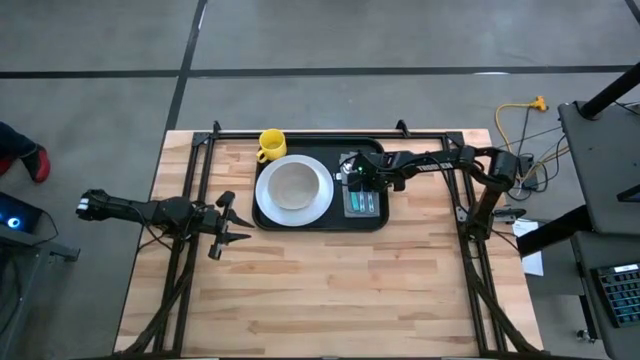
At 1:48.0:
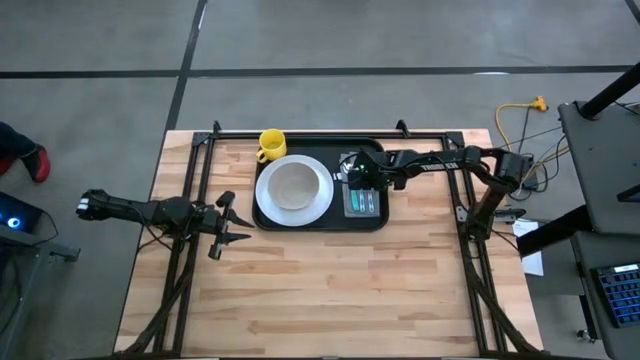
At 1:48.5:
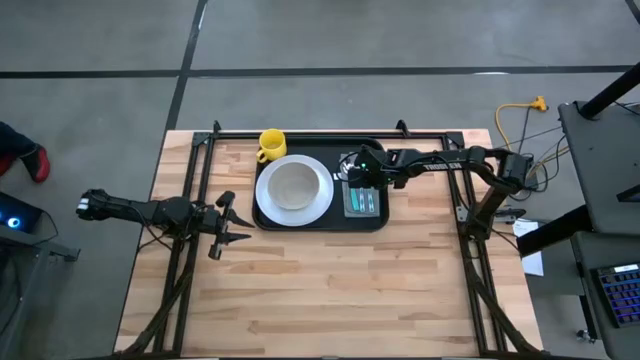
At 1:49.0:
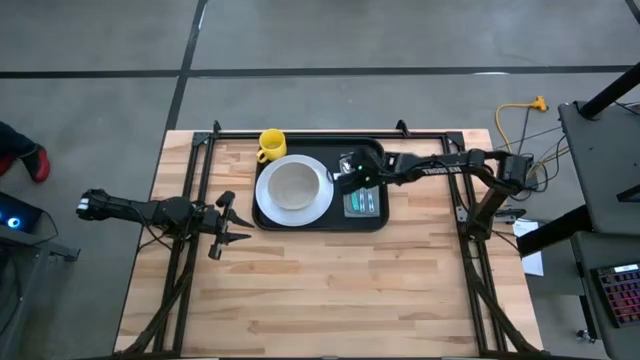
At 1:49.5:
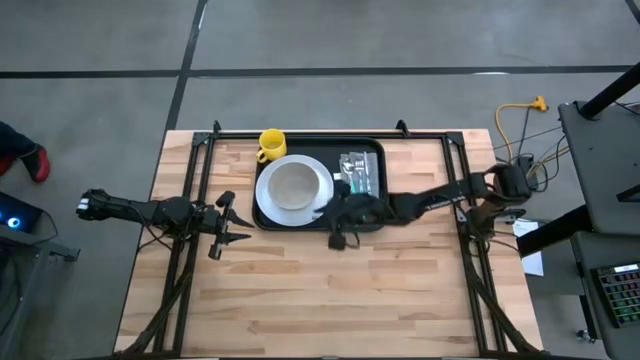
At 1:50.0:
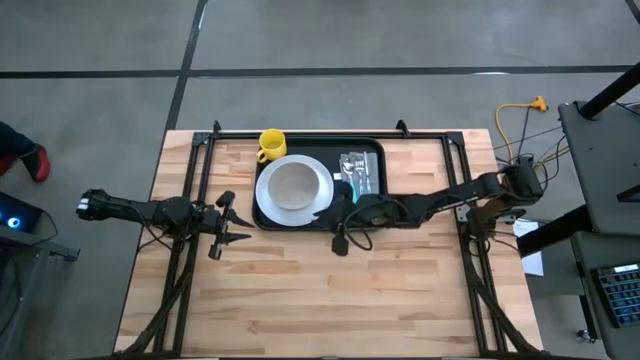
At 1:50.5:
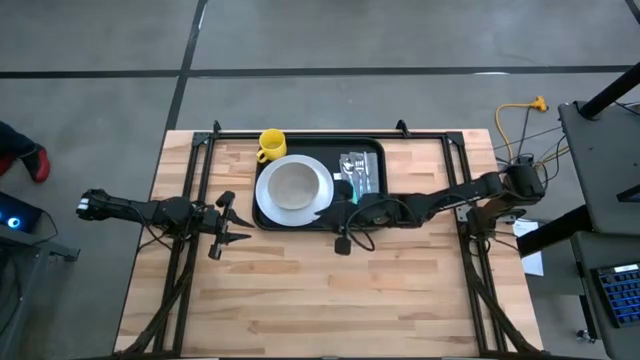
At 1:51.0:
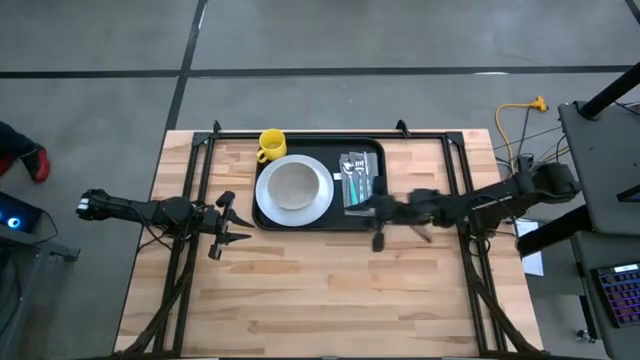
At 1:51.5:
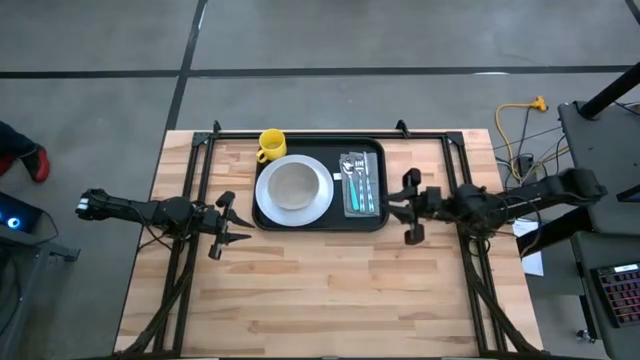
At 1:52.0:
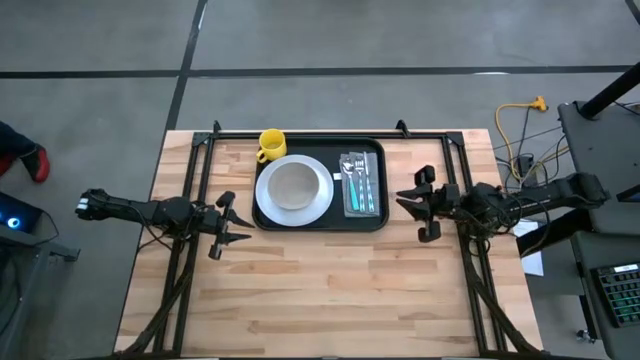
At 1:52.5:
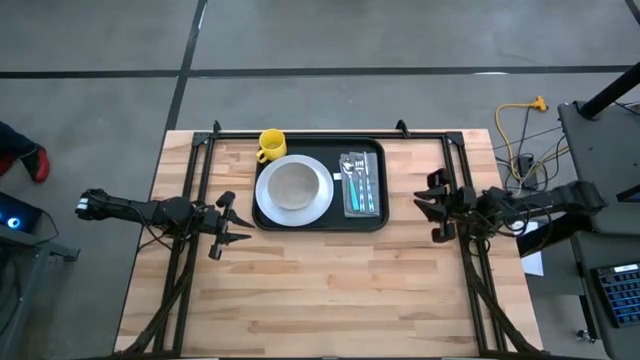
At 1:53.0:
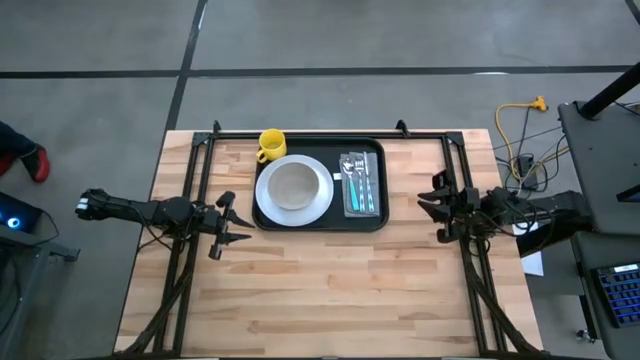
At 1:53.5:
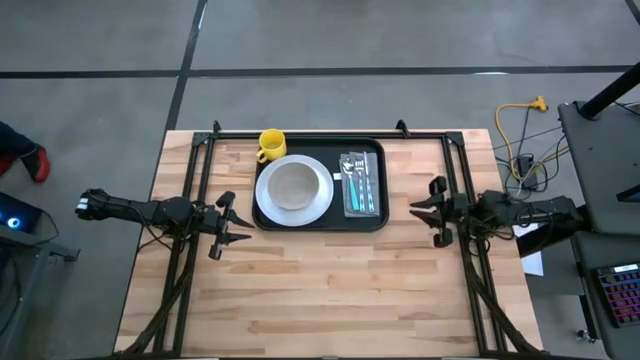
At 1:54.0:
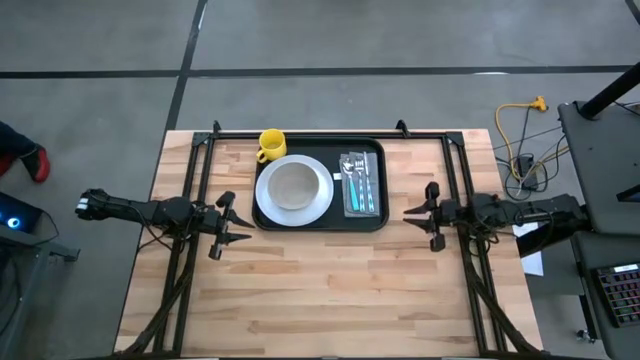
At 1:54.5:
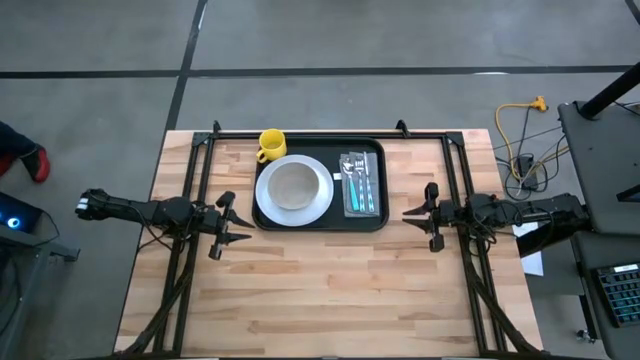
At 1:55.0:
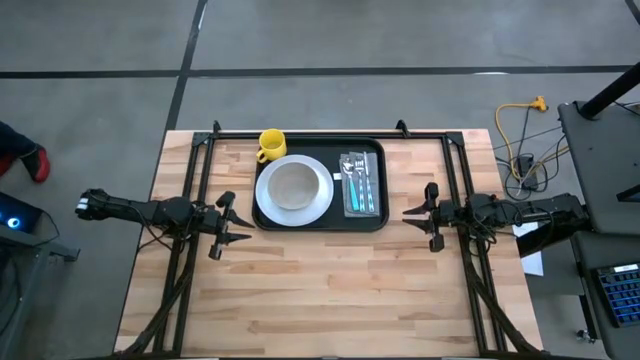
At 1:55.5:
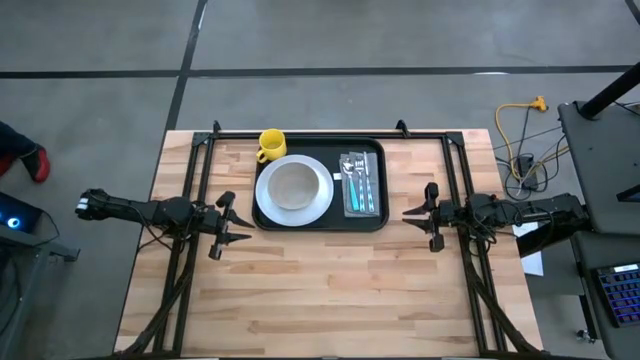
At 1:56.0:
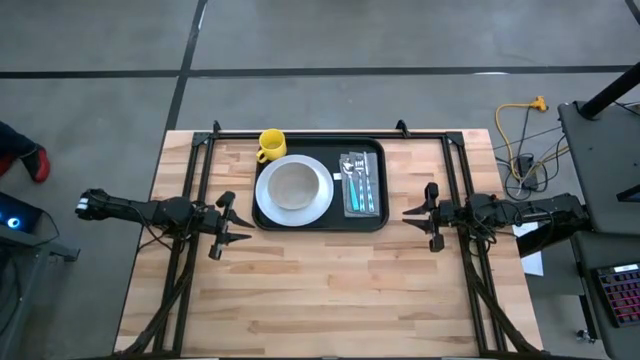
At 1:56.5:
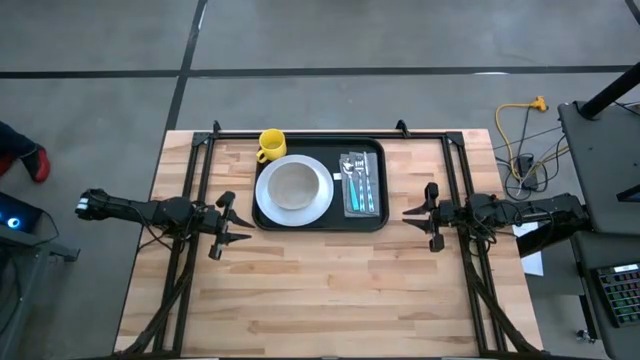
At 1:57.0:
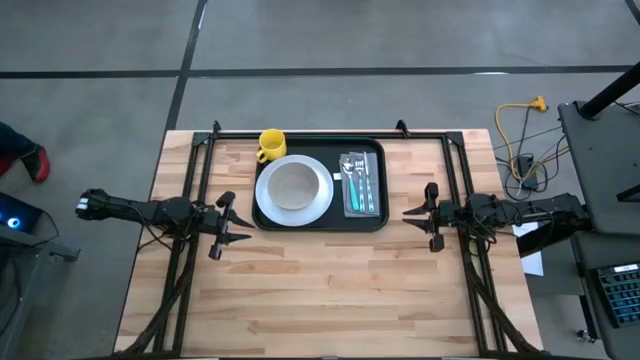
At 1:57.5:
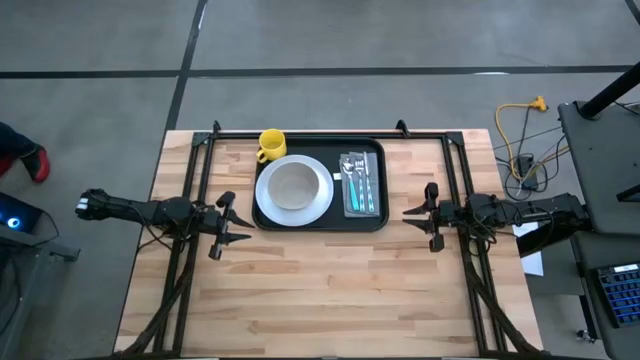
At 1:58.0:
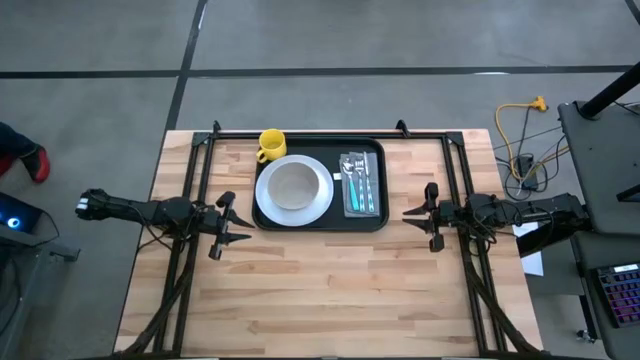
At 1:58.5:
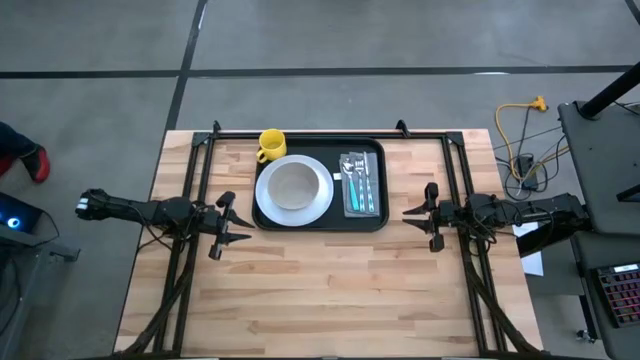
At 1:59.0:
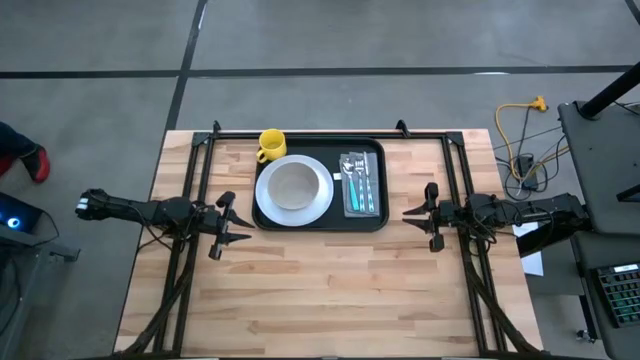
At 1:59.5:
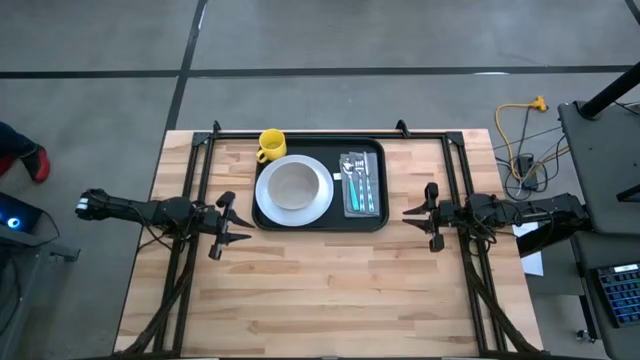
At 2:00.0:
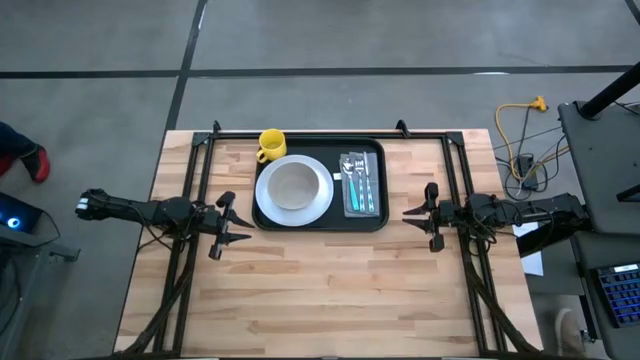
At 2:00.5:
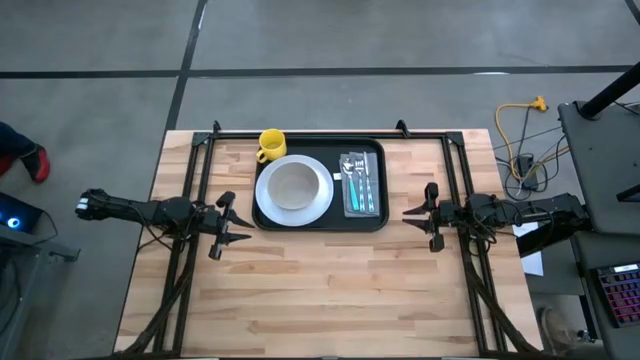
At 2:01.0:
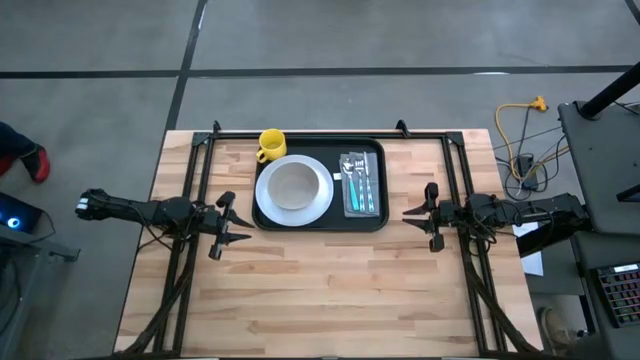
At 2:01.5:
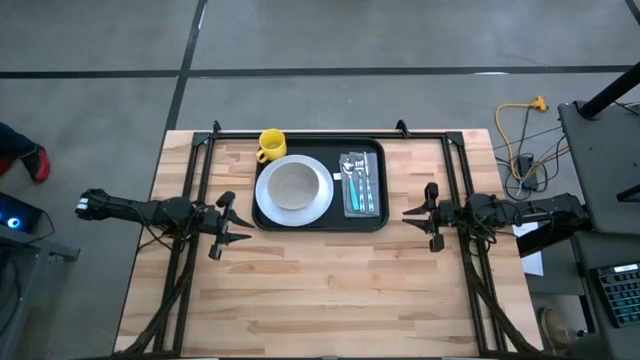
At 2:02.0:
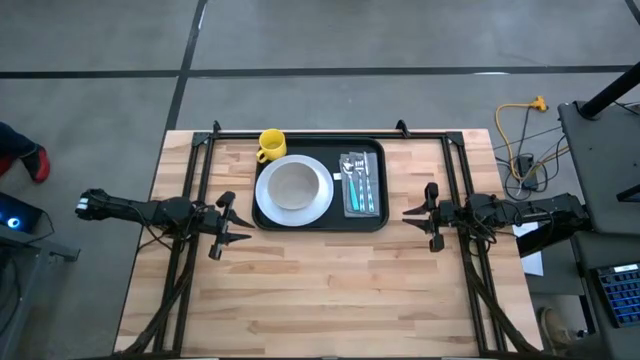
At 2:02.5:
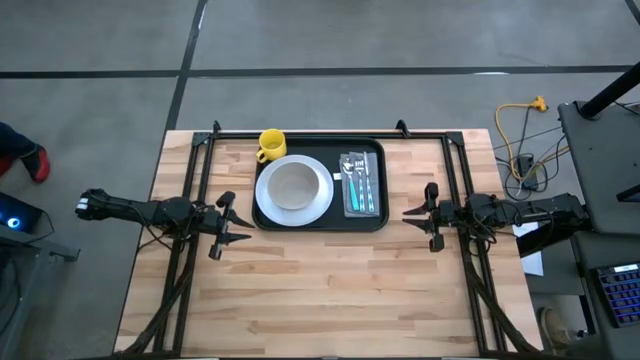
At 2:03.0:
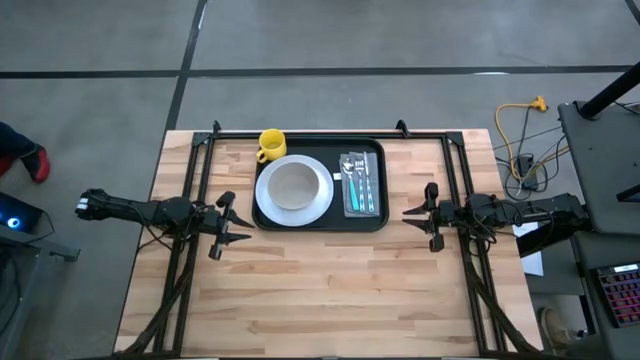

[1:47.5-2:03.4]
Task: Set up tray
Return to Home Position

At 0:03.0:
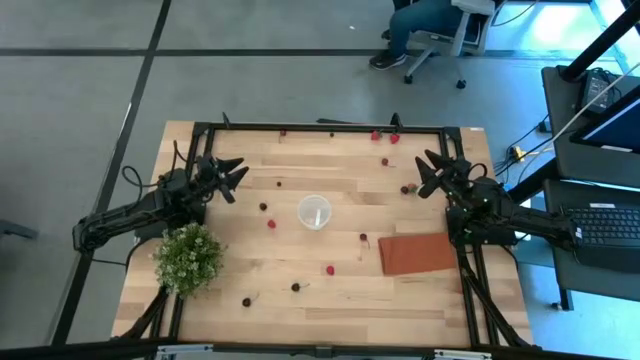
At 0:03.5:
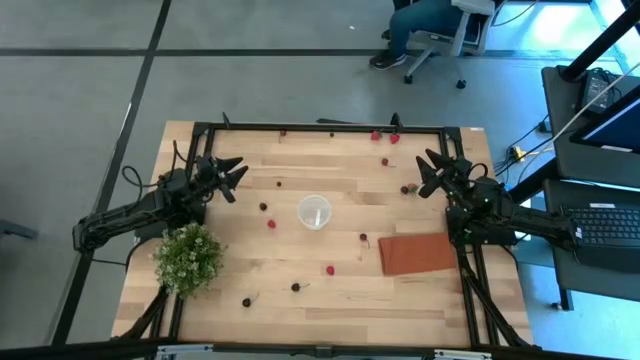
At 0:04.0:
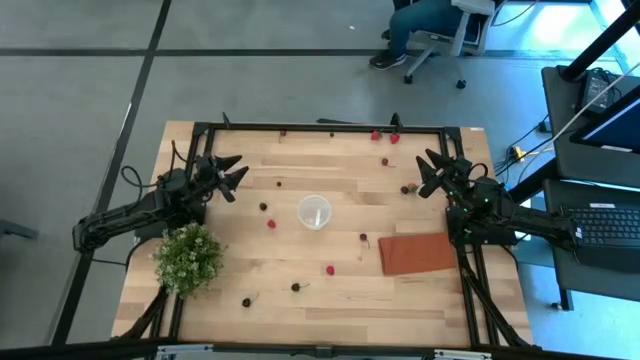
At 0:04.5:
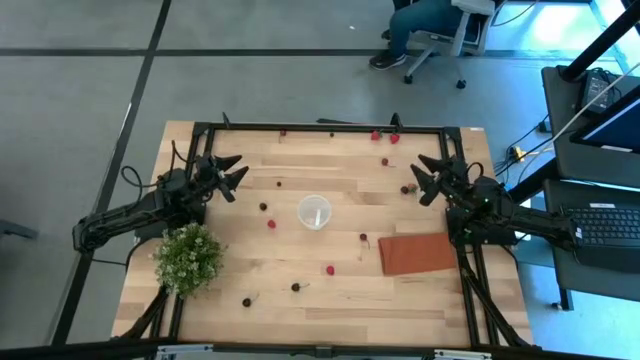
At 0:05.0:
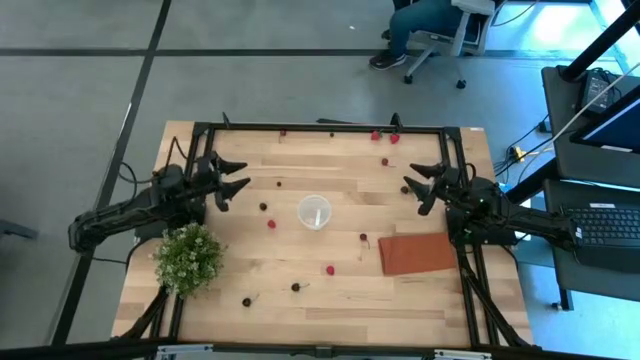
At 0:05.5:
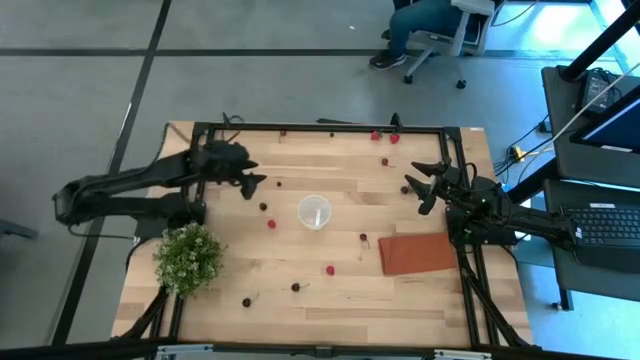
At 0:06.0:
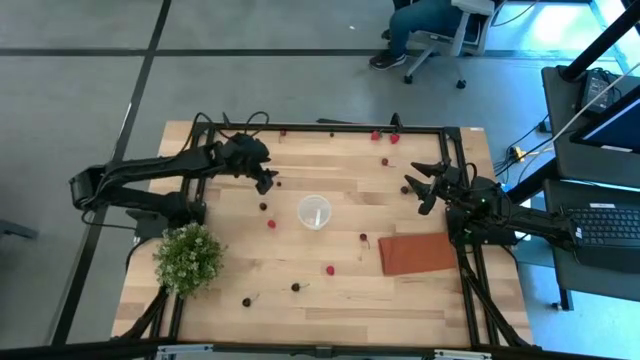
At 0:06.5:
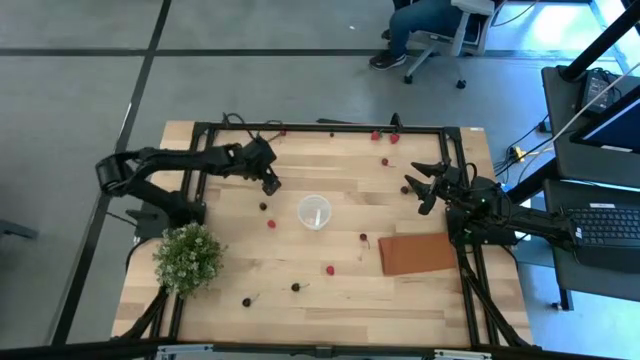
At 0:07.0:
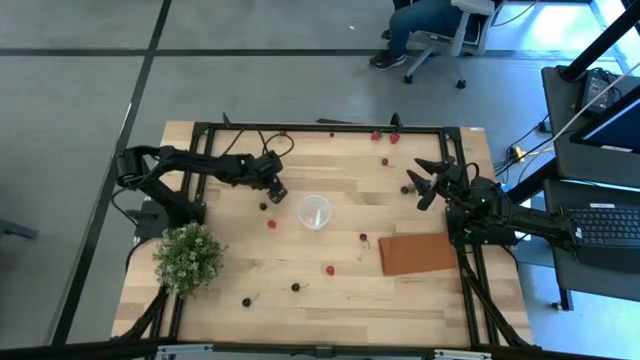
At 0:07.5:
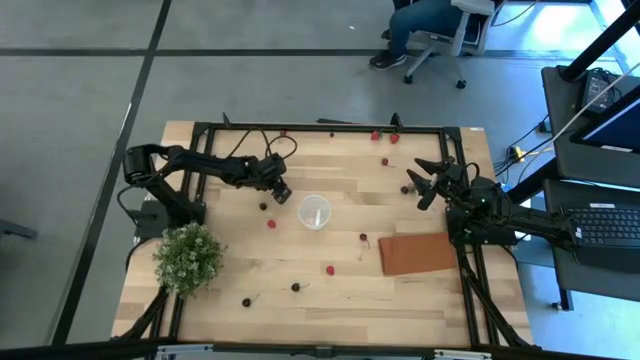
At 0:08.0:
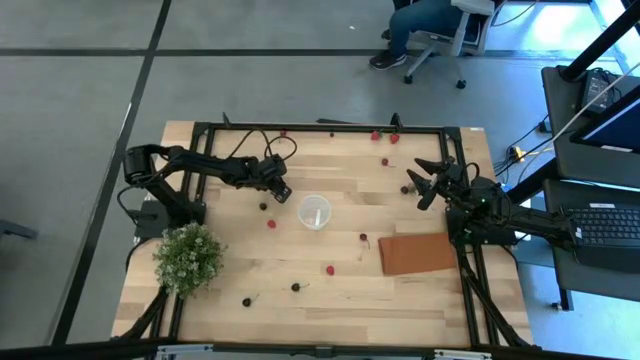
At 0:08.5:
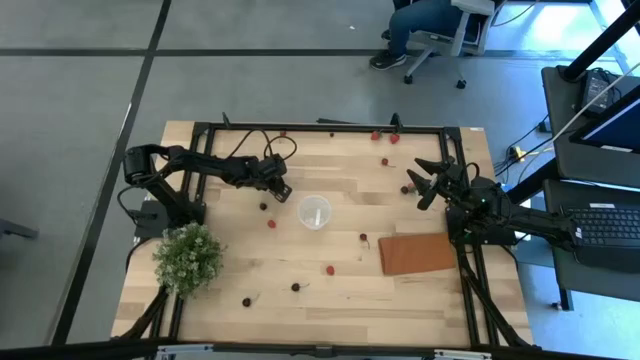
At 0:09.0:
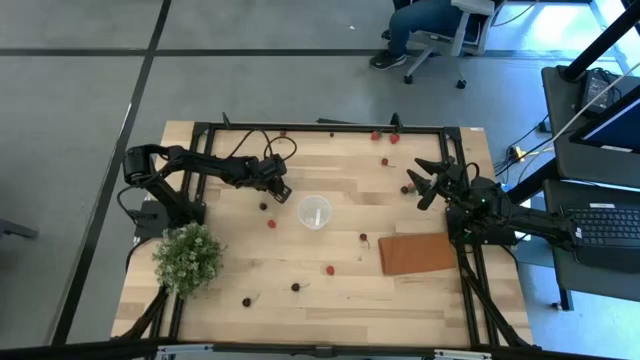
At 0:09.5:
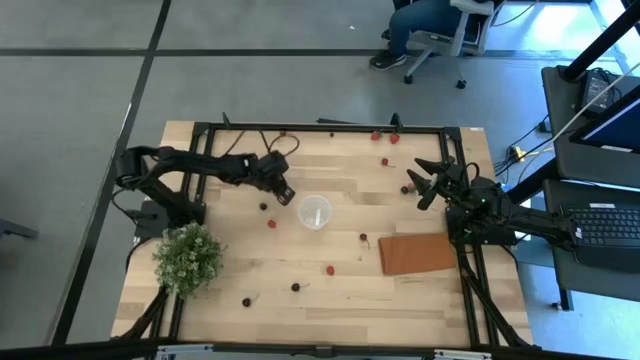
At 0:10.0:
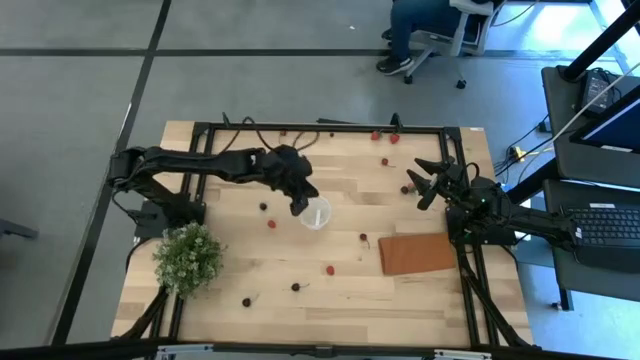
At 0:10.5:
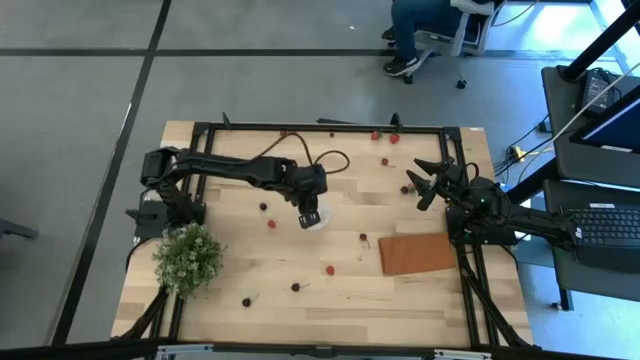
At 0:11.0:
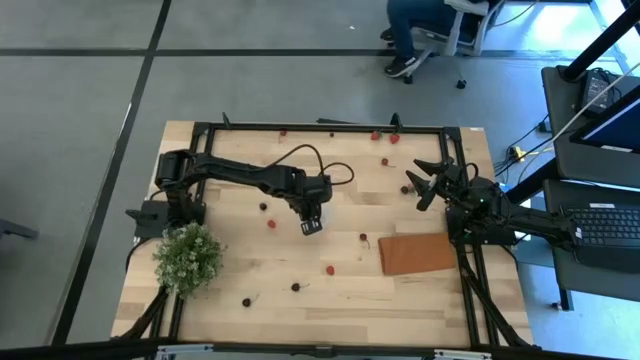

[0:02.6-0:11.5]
Task: Pick and placing Produce into tupperware
Put the bottom blueberry into the bin
